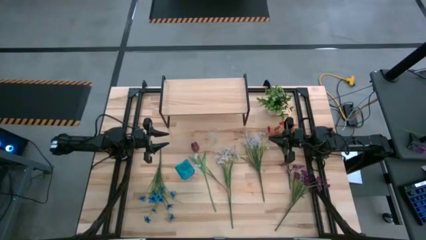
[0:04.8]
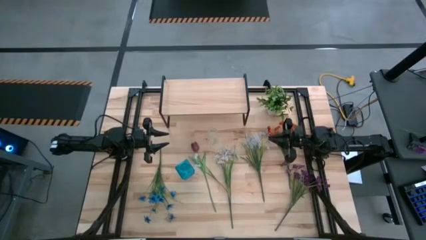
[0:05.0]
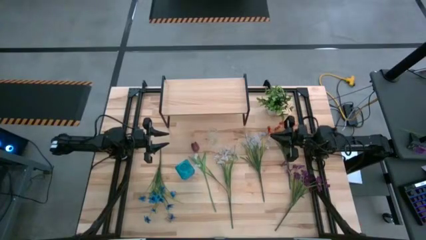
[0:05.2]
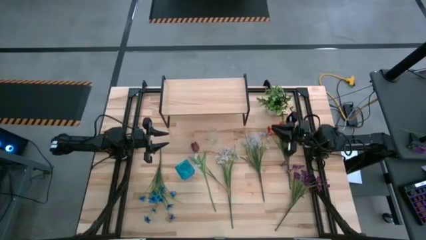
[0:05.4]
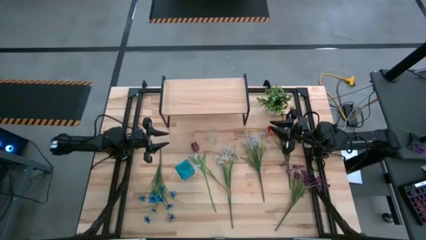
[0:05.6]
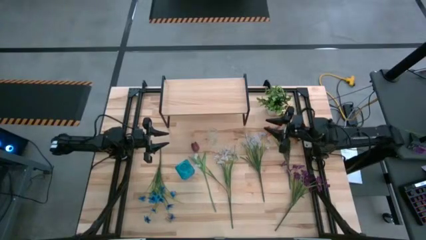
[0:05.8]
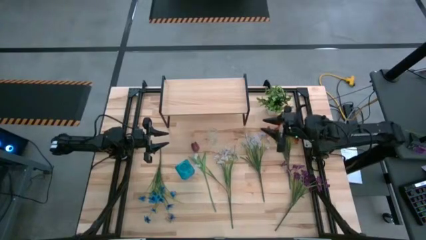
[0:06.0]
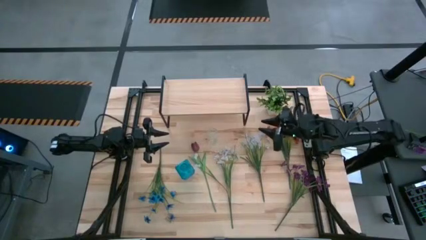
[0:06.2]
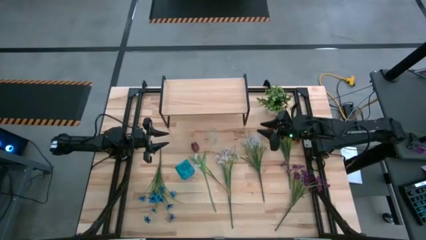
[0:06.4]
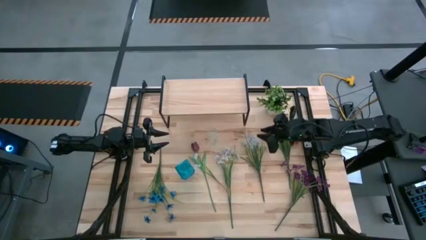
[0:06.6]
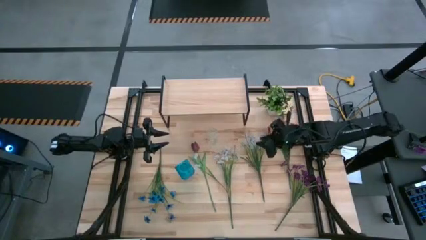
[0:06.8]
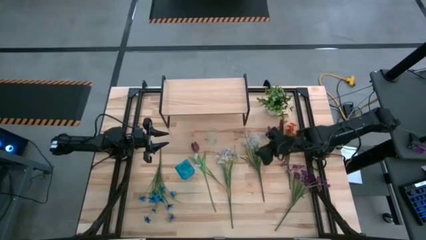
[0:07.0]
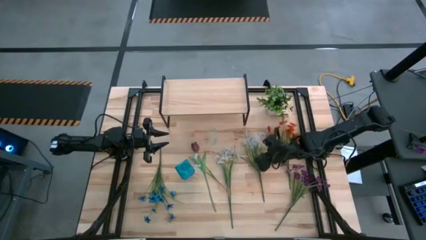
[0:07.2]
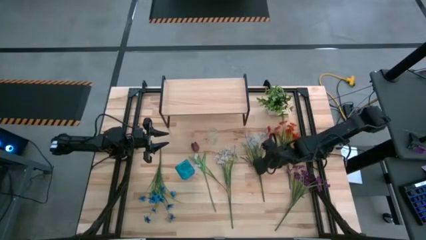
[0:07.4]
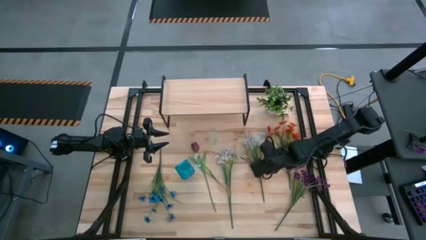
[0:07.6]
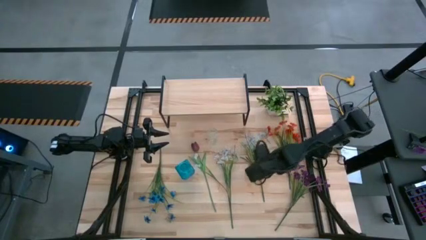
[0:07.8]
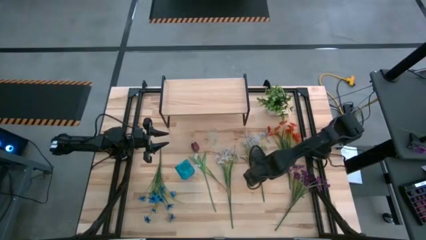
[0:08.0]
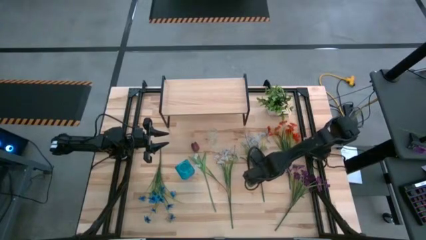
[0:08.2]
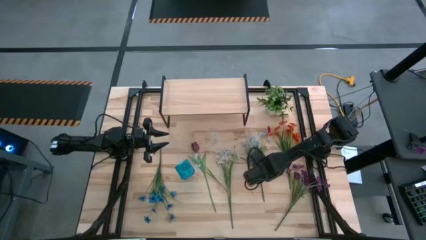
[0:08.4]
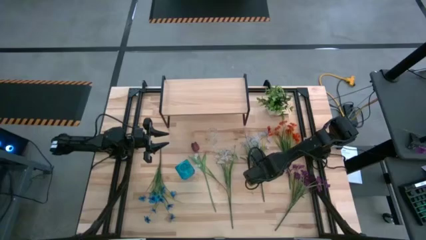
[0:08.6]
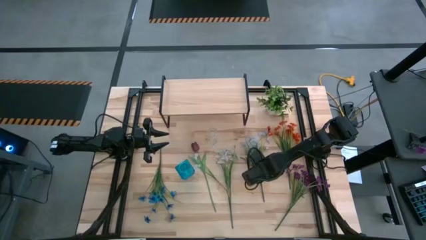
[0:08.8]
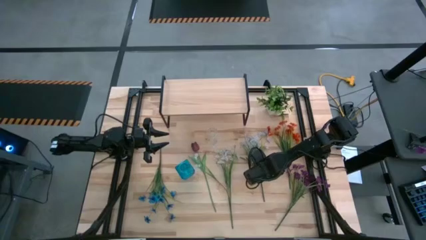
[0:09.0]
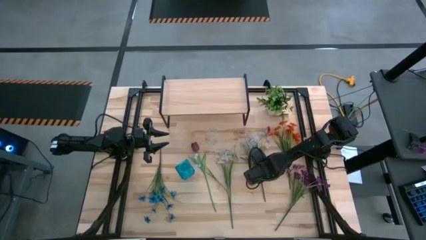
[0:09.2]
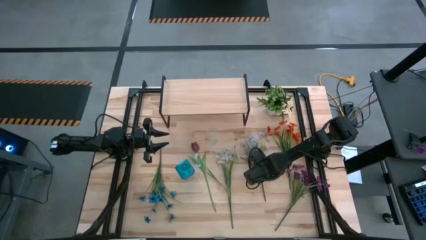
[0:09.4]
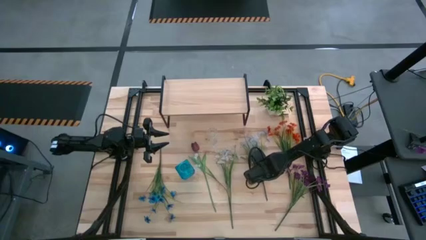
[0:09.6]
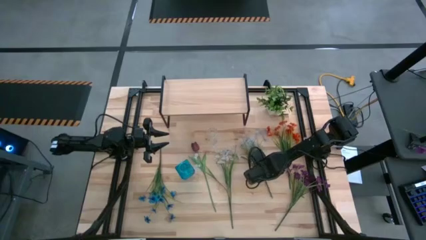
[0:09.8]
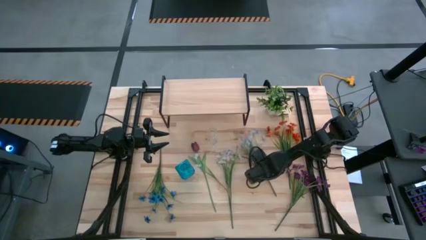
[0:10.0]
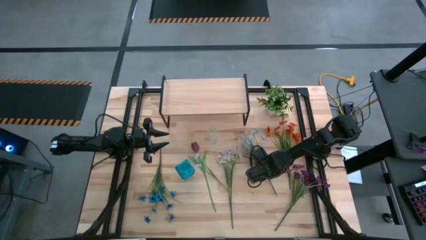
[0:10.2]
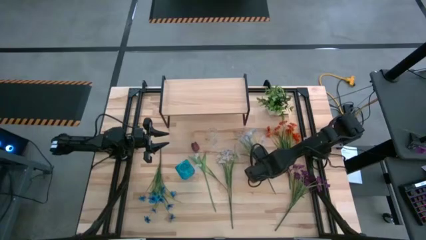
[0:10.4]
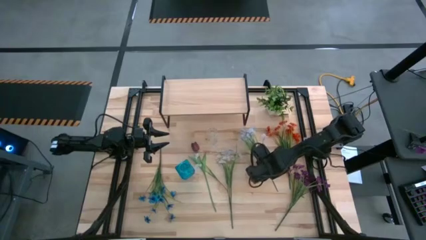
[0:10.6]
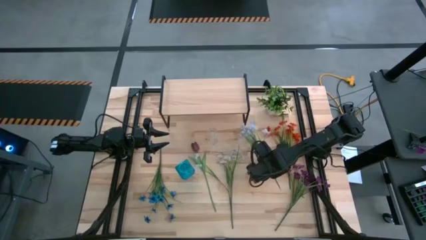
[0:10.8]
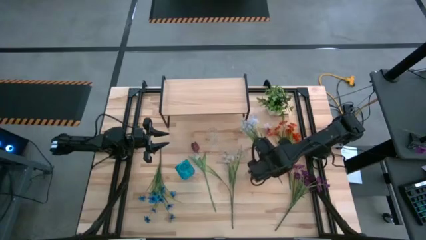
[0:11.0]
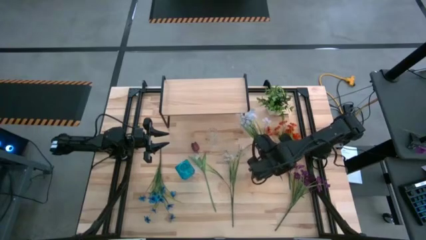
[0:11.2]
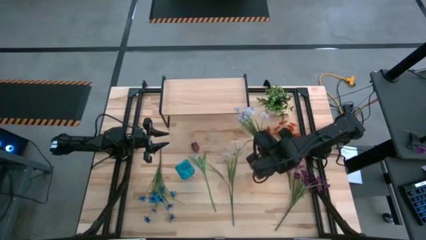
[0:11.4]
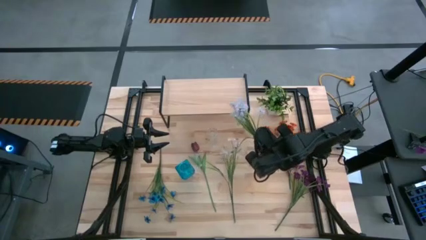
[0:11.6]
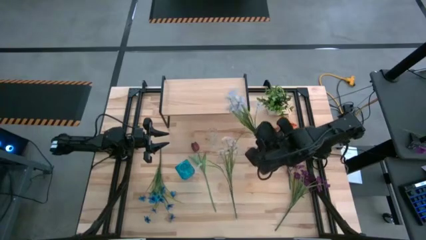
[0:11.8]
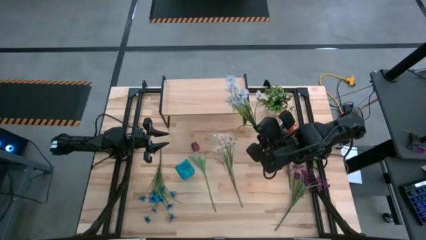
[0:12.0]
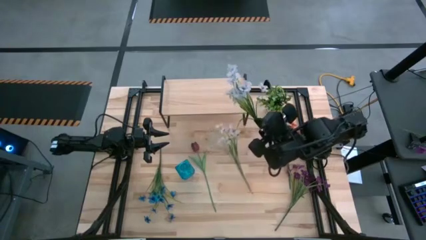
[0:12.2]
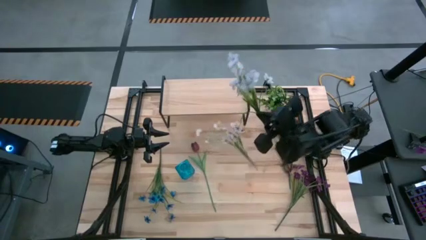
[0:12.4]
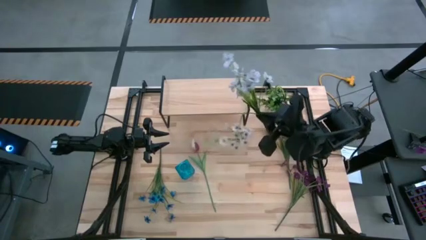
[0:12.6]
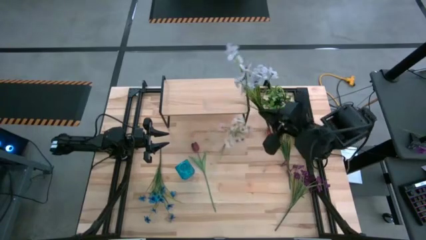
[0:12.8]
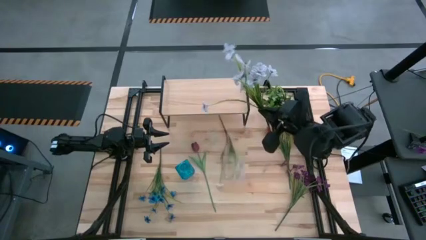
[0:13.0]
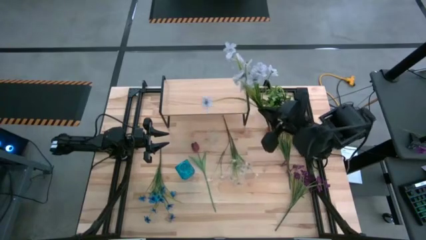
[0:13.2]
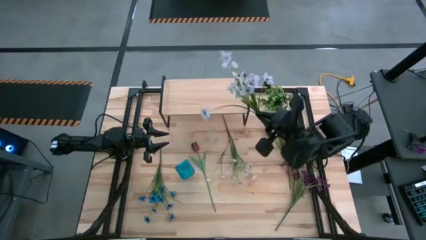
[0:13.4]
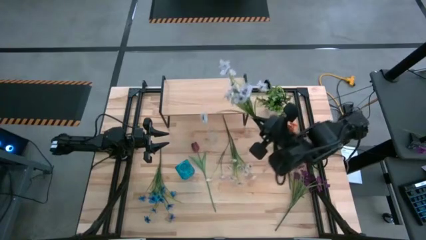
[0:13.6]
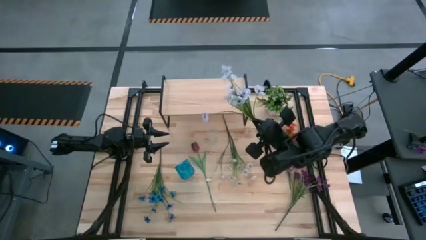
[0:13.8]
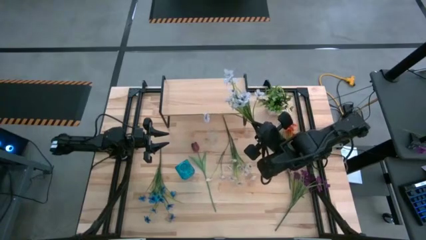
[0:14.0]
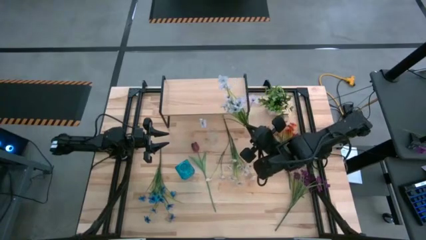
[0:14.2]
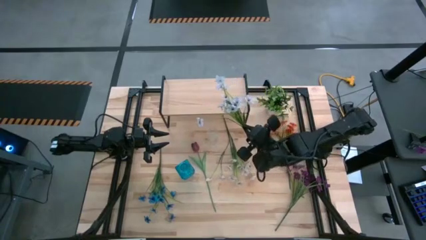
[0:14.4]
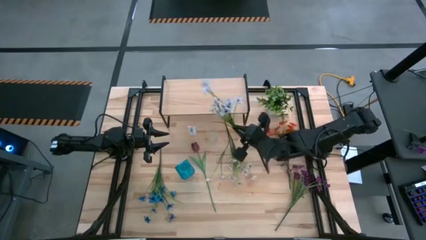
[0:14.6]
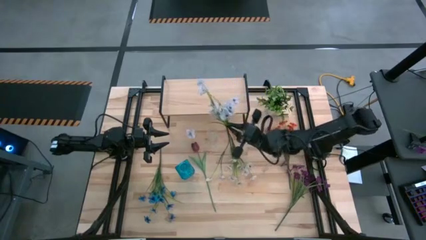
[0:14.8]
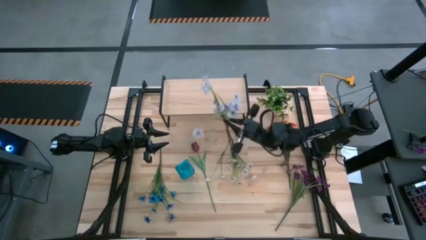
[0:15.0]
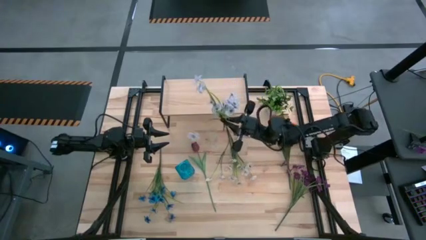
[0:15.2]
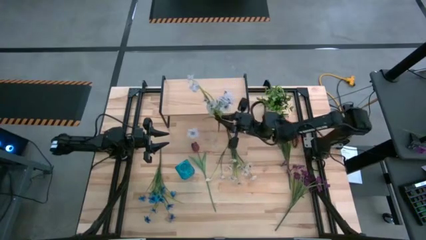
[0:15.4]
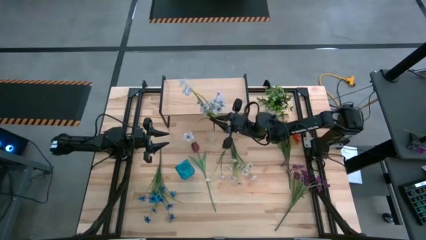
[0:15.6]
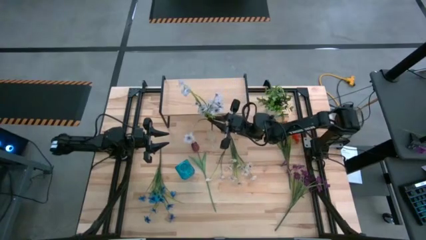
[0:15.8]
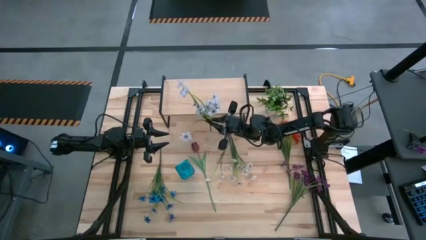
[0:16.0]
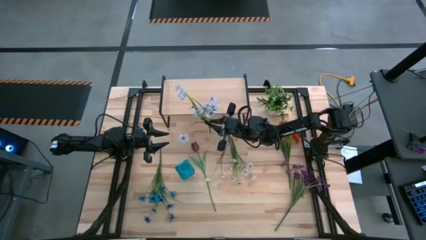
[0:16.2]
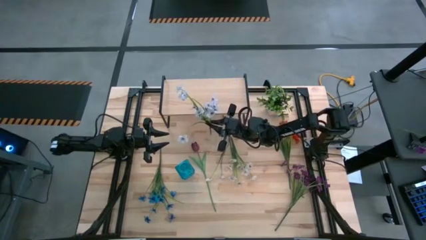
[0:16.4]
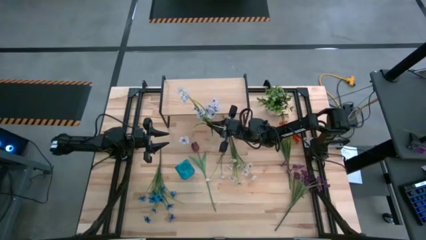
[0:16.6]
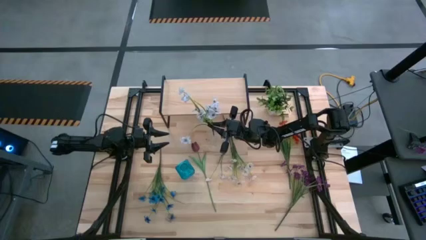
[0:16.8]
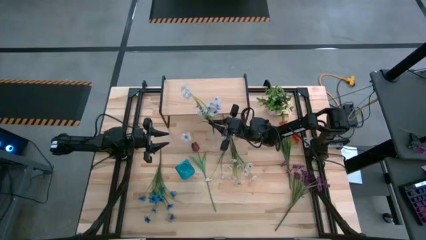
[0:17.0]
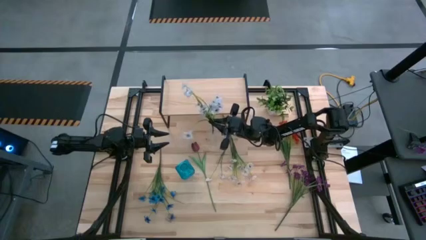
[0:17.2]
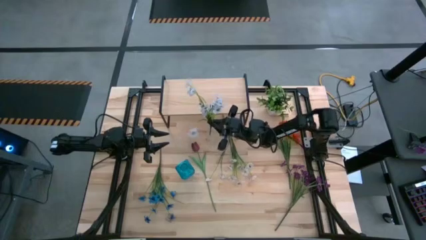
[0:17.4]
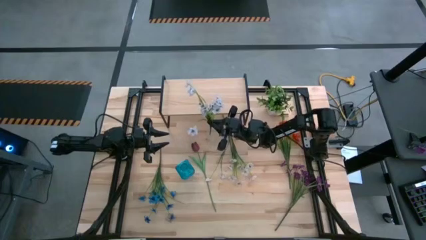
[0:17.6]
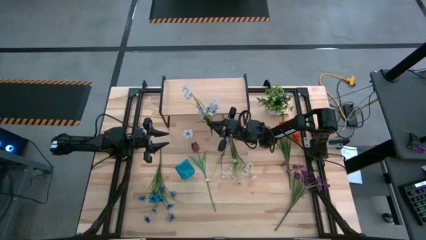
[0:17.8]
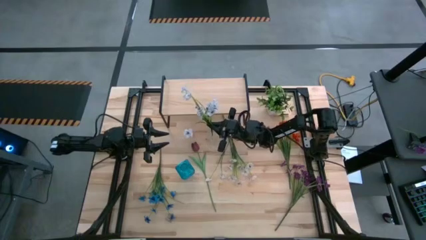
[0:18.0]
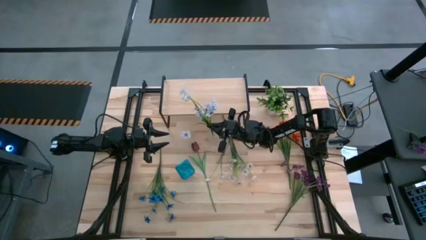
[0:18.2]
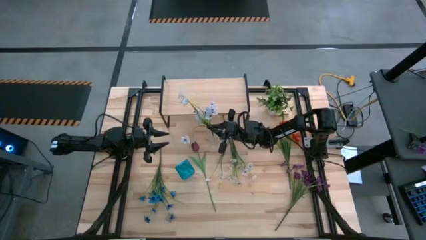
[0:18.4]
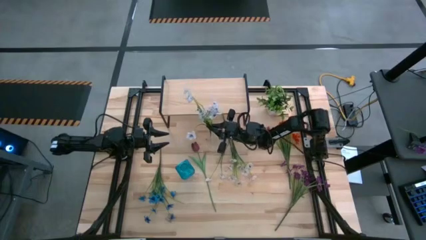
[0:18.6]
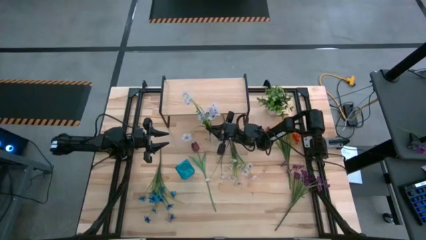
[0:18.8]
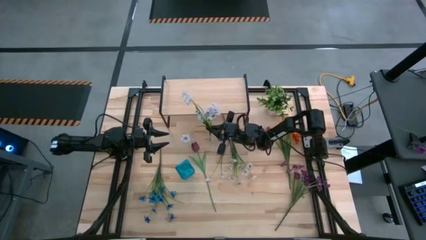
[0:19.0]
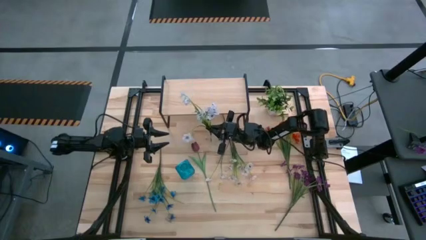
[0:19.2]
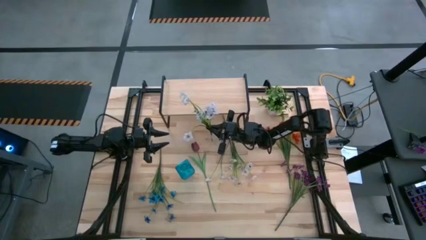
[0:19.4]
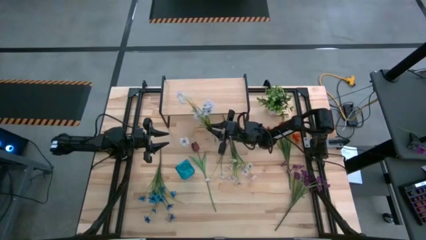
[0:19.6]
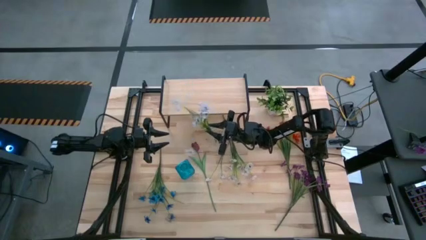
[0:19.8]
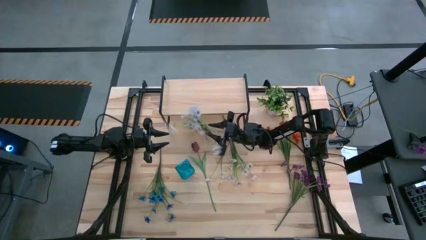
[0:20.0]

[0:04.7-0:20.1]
Task: Pick and place flowers into a vace then onto a shelf
Put the right white flowers into the transparent vase
